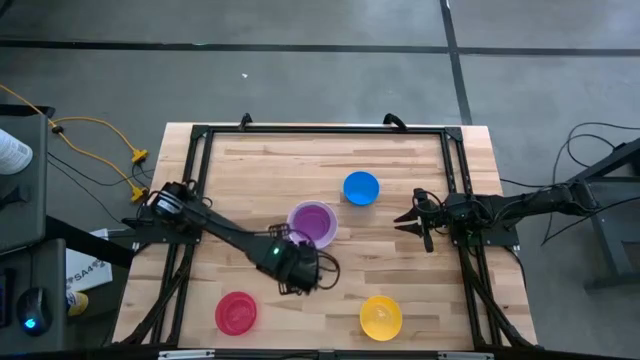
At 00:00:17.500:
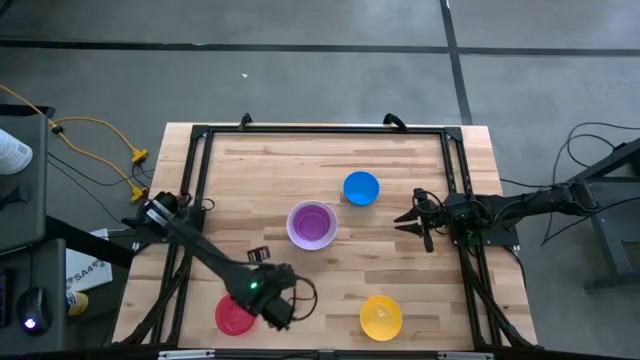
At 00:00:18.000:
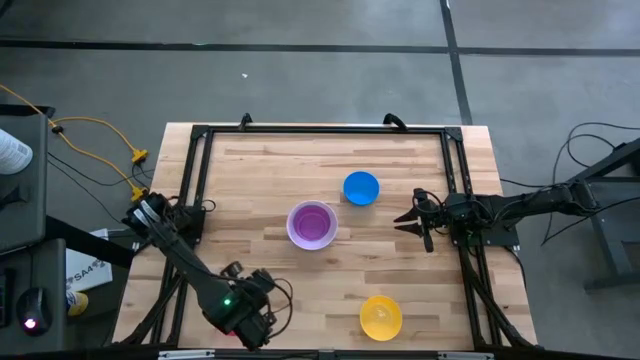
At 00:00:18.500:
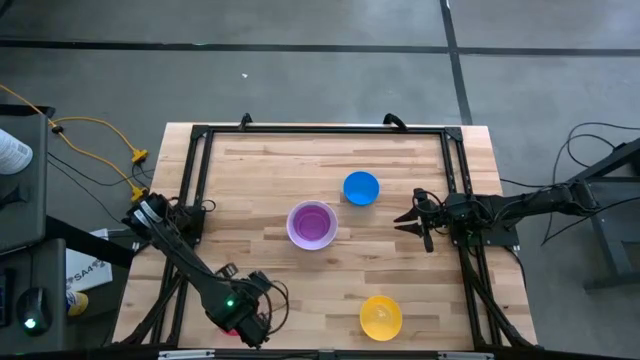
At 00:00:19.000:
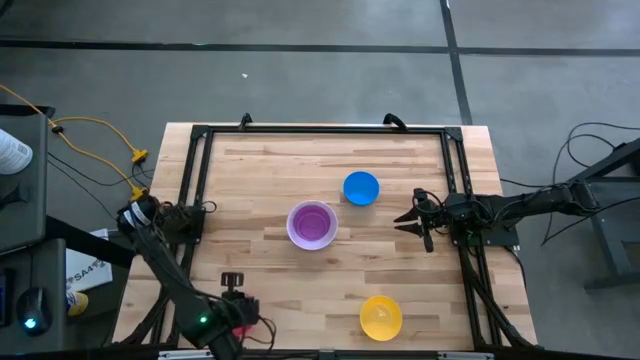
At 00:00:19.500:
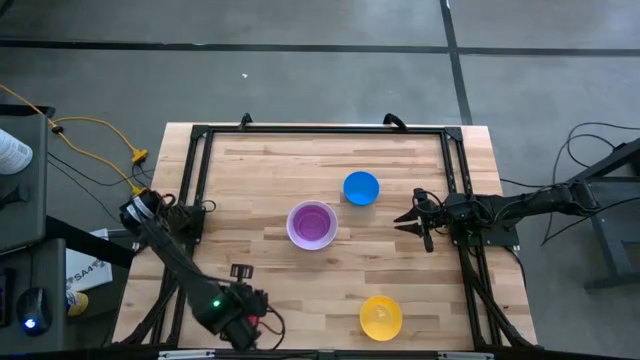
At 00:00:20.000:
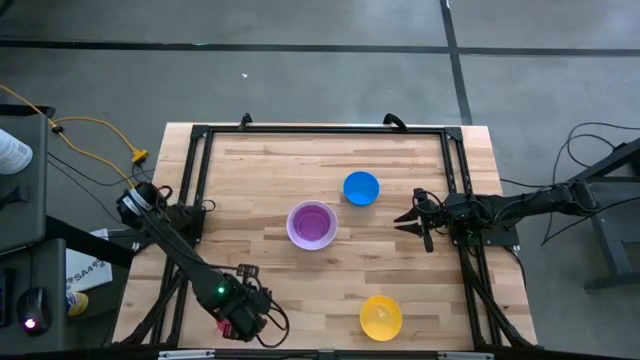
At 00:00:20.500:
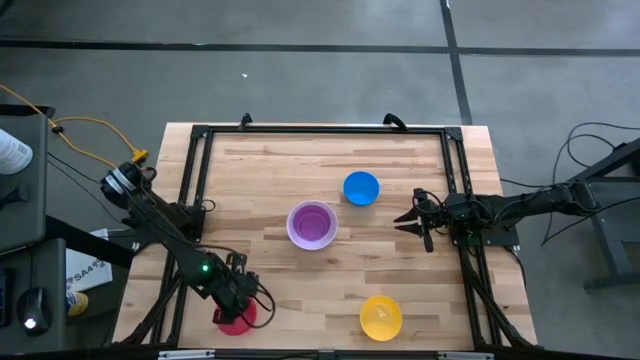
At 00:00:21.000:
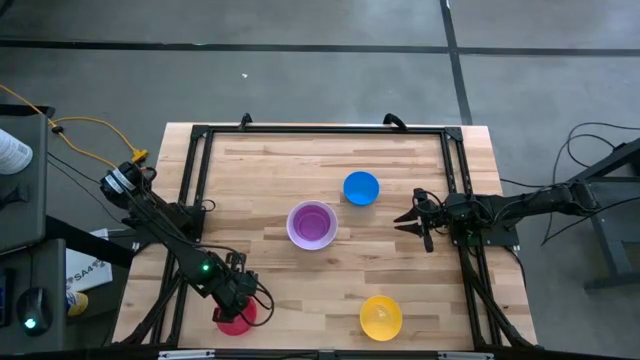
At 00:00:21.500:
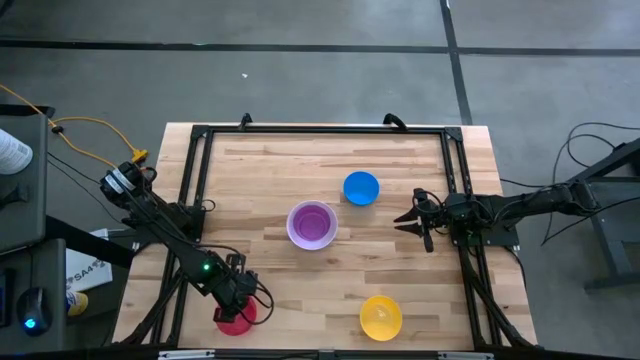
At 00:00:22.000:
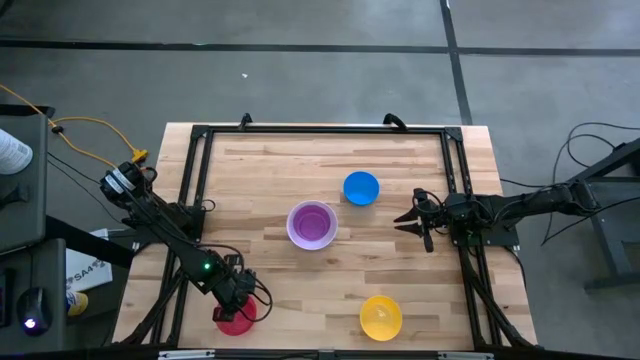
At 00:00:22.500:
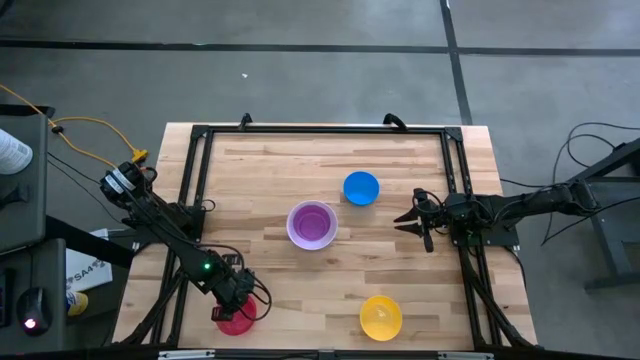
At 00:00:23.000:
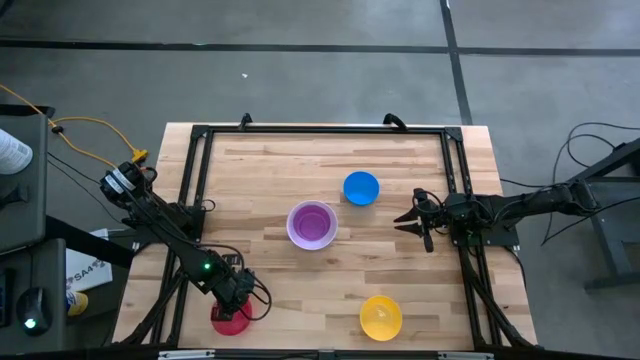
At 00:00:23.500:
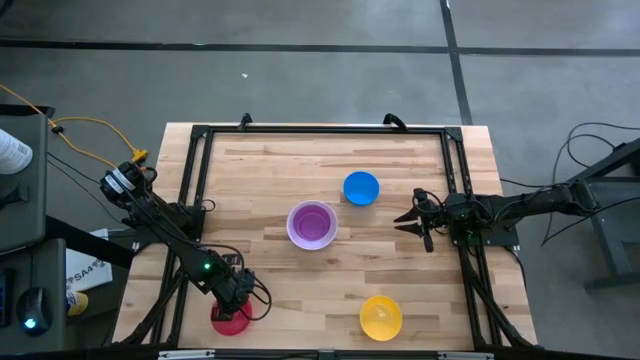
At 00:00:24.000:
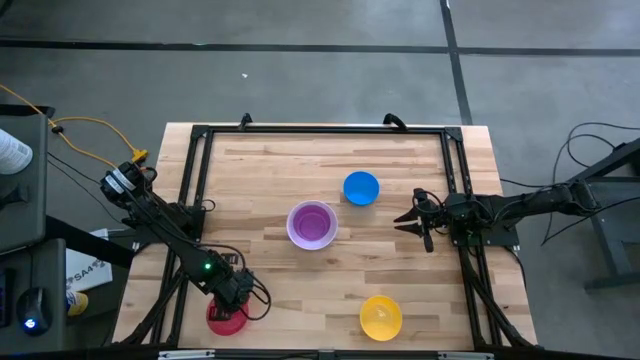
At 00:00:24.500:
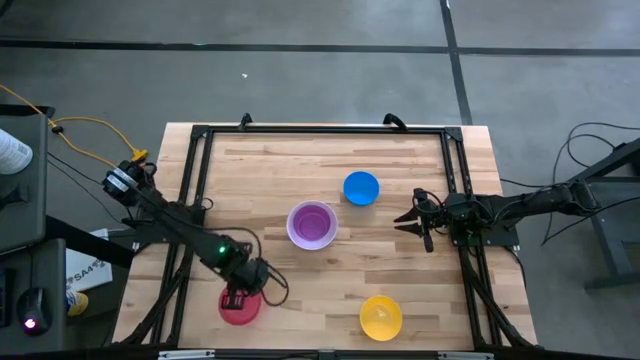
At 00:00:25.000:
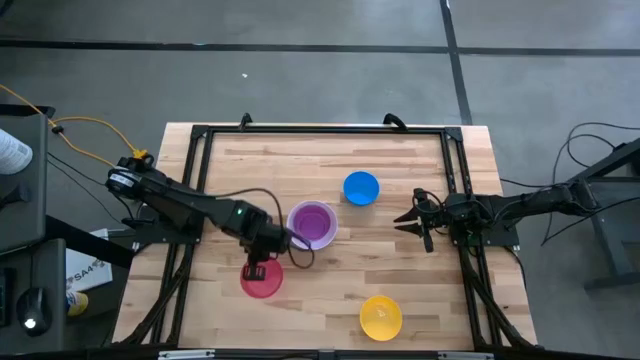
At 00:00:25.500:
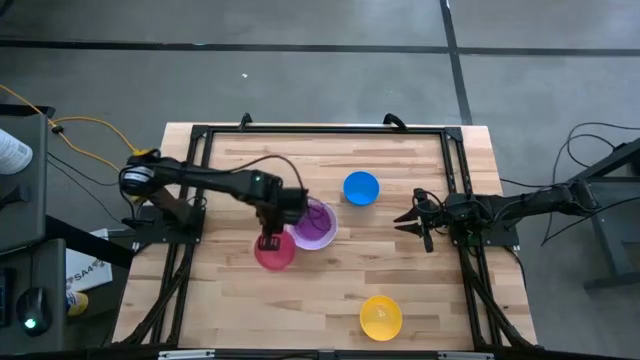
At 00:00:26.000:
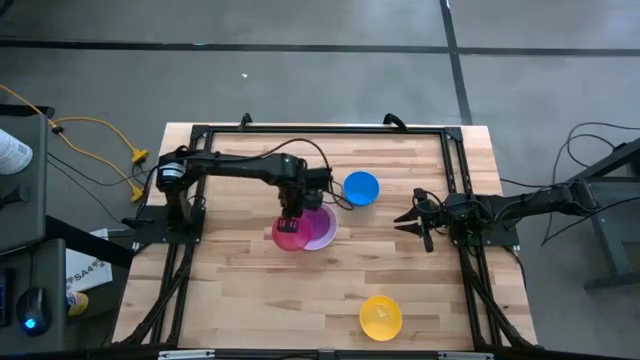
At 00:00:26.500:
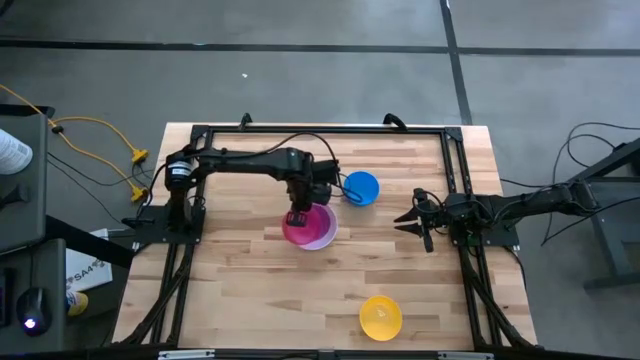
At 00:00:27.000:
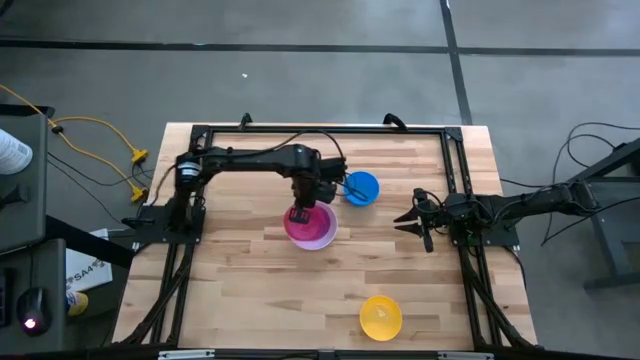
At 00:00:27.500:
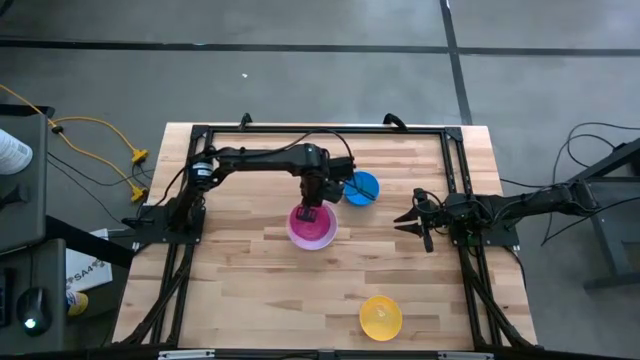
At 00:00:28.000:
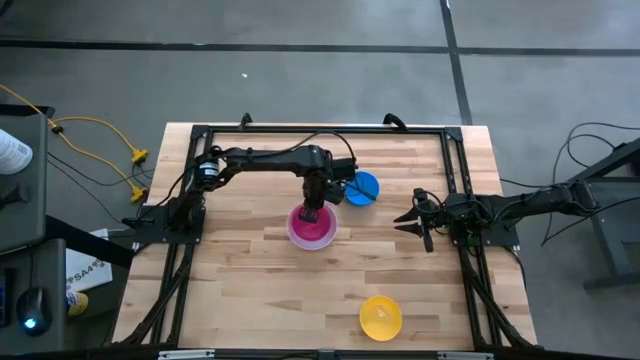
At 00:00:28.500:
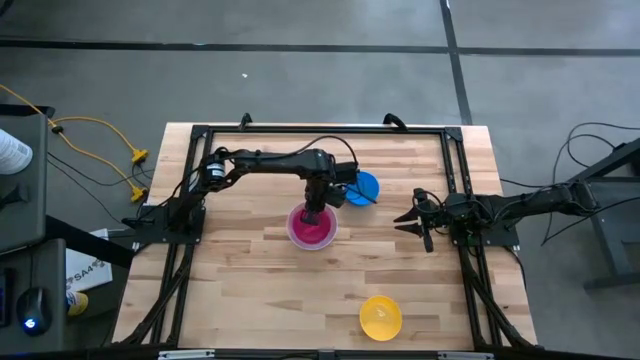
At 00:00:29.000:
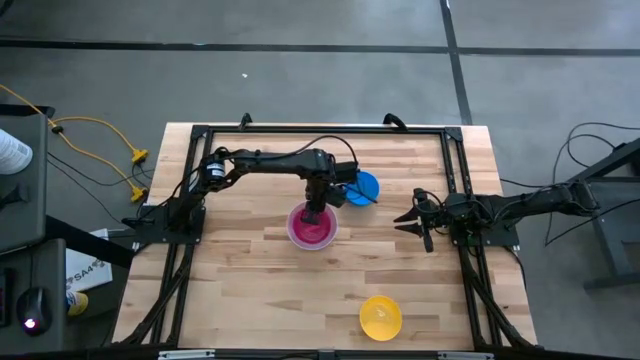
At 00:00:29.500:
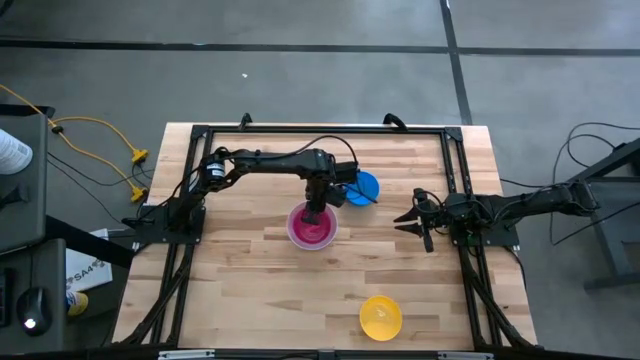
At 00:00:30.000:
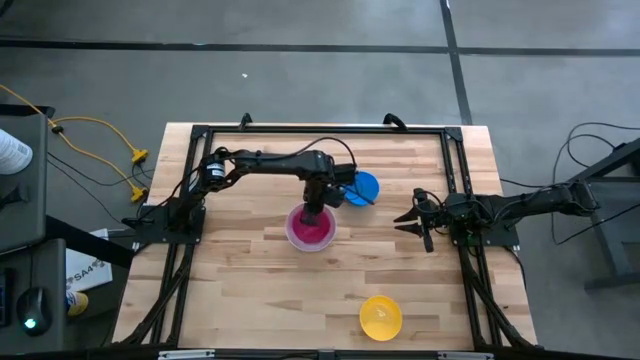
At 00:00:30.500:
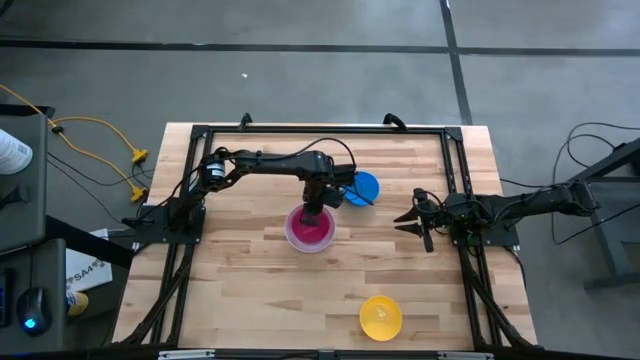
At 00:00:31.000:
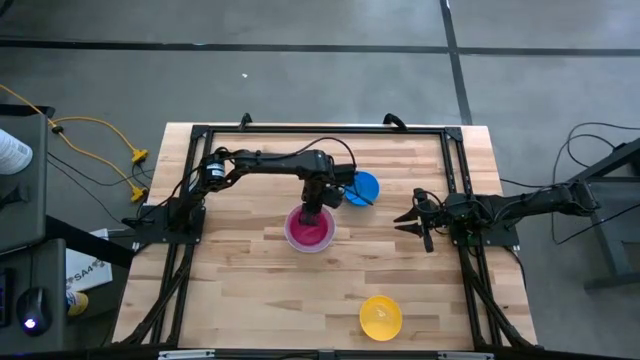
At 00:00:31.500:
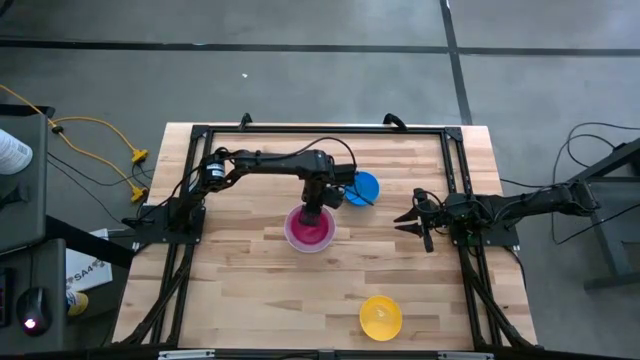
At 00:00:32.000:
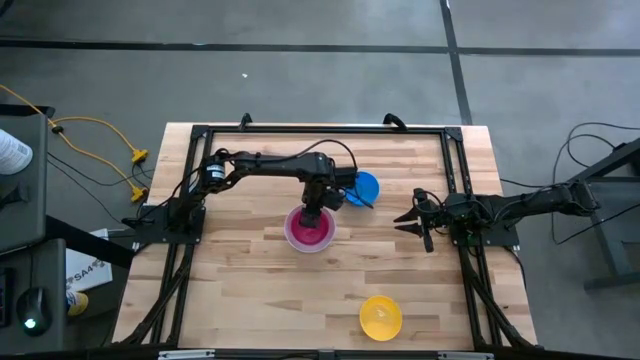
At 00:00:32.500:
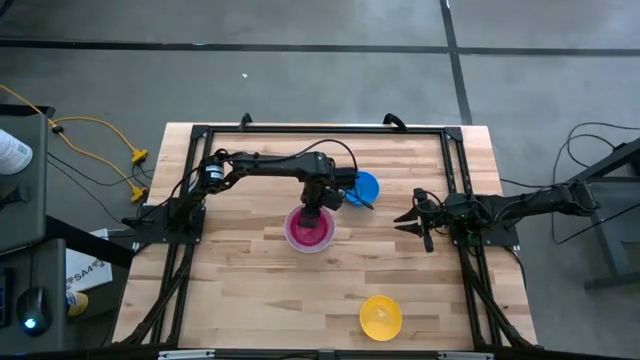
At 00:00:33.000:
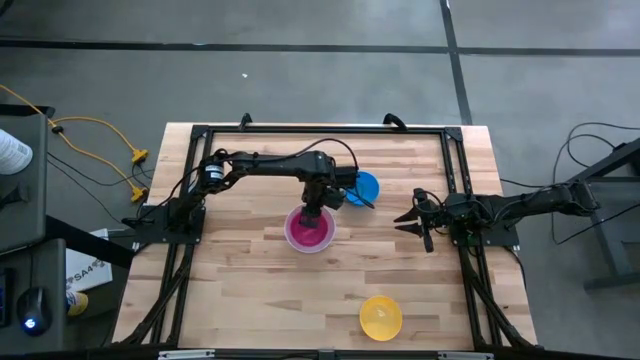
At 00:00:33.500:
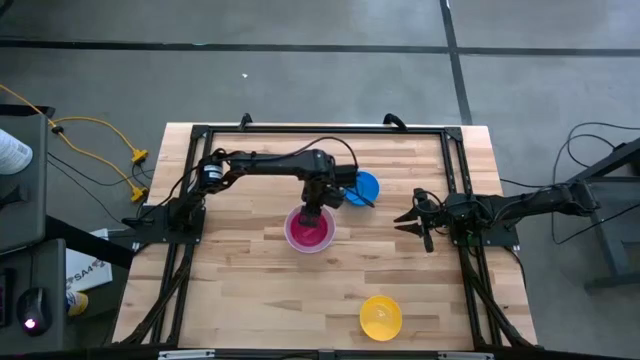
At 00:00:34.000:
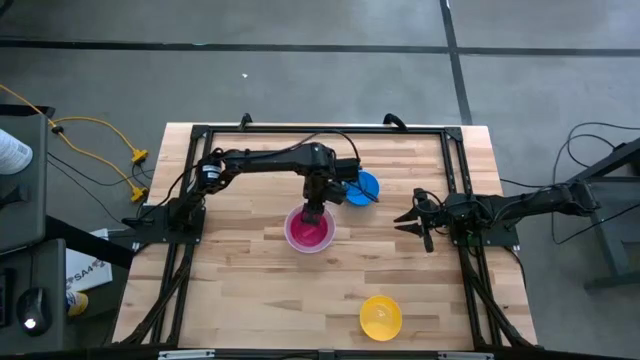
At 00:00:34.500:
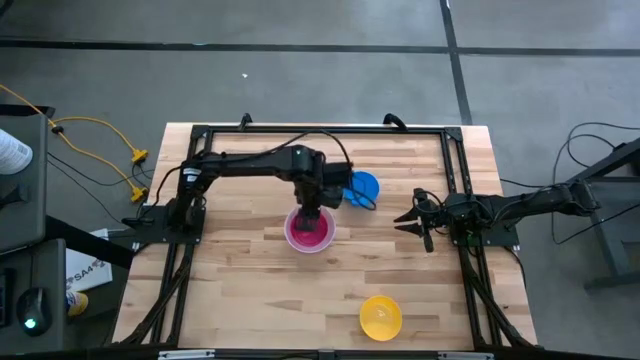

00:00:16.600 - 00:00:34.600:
Stack the pink bowl into the violet bowl
